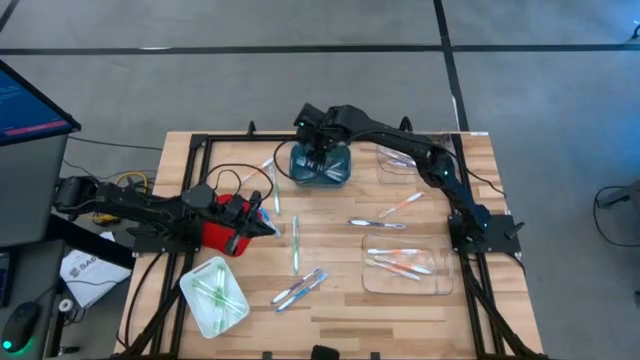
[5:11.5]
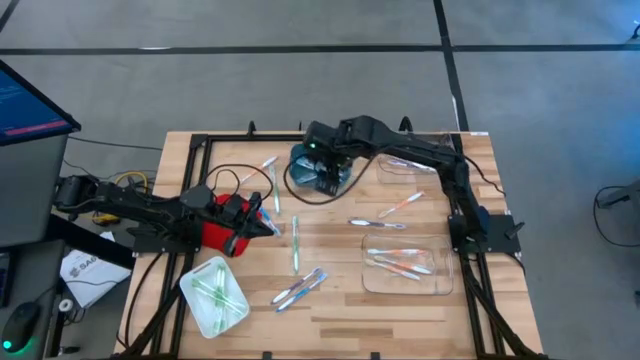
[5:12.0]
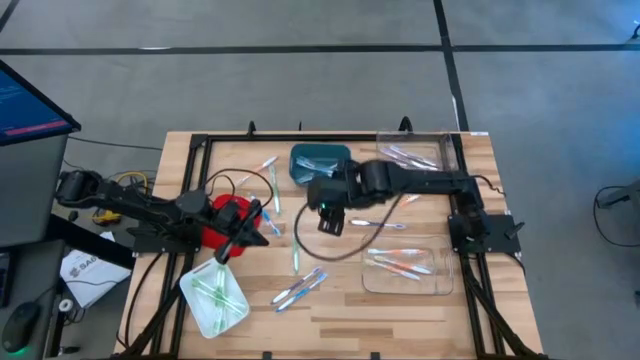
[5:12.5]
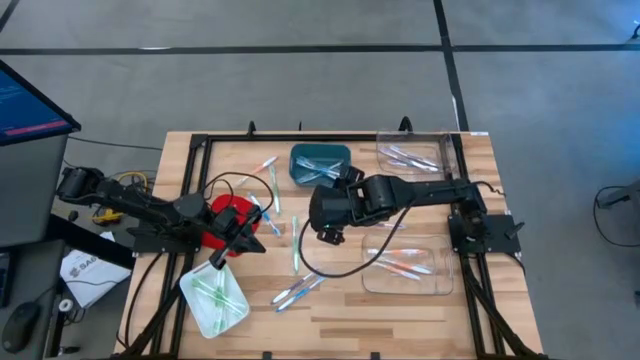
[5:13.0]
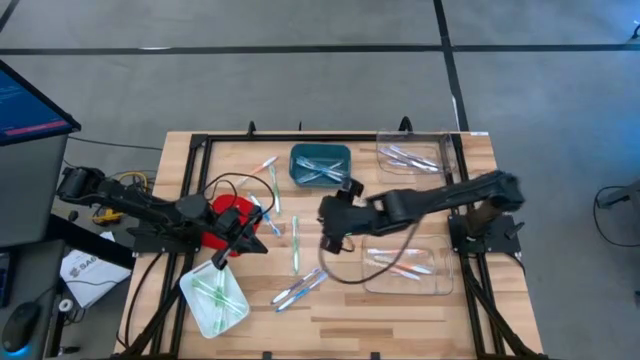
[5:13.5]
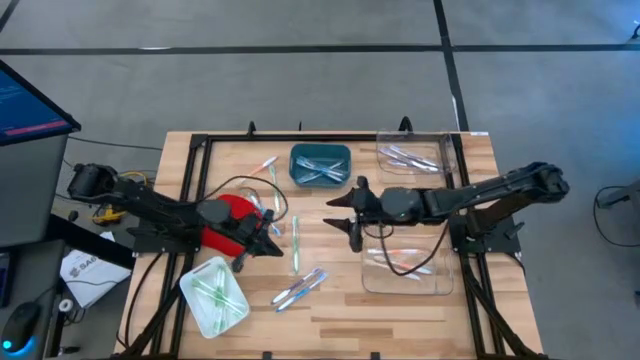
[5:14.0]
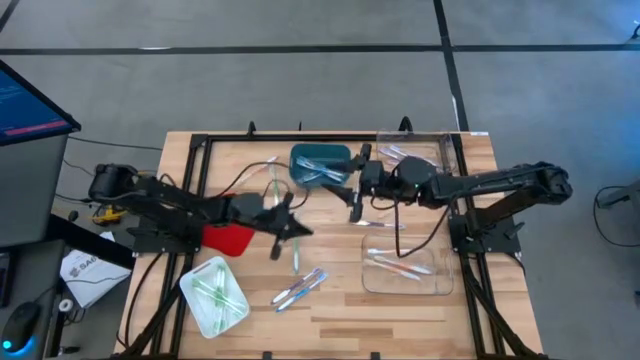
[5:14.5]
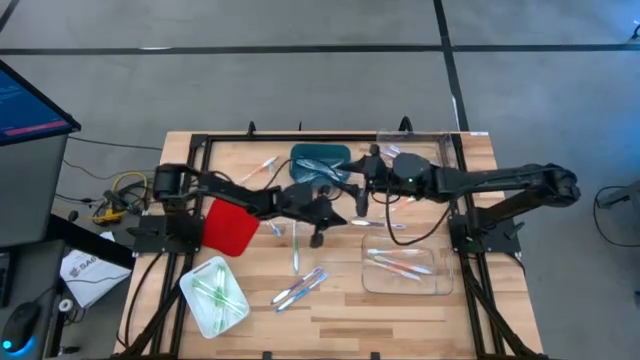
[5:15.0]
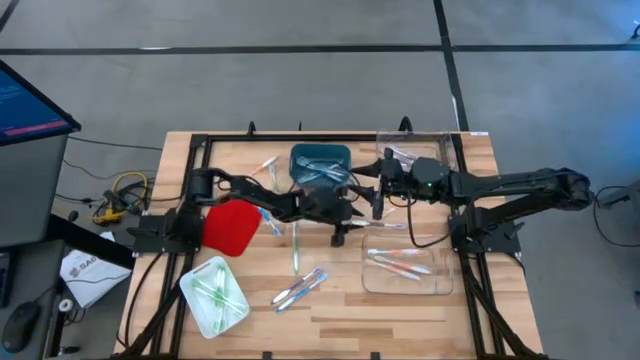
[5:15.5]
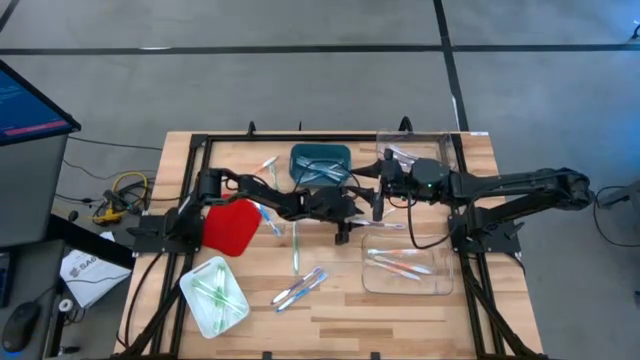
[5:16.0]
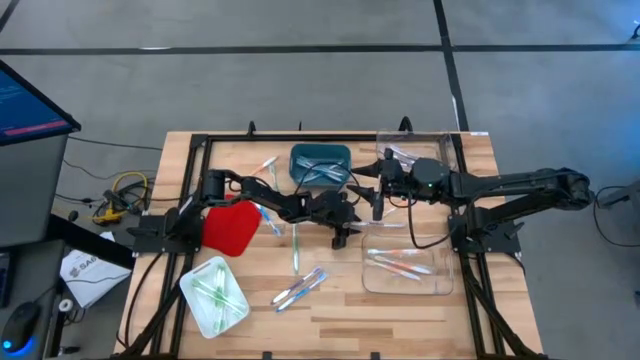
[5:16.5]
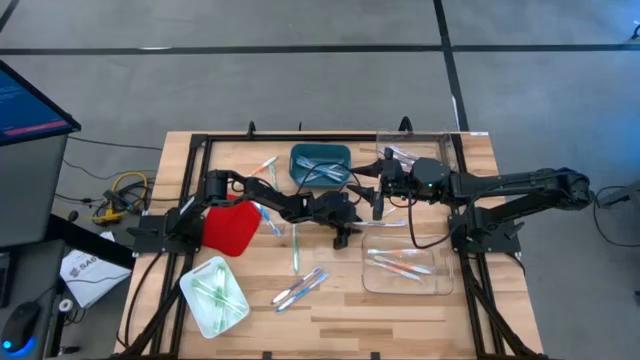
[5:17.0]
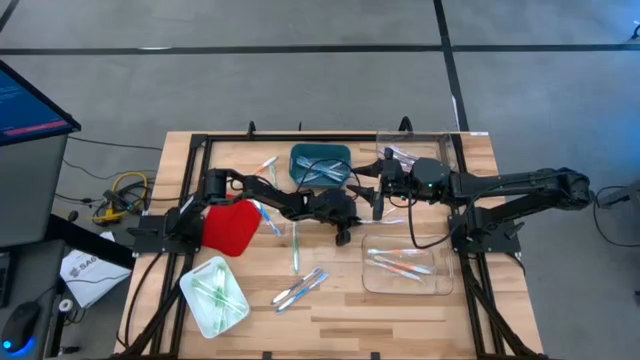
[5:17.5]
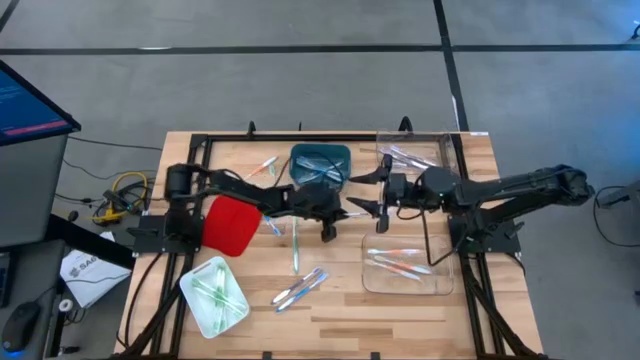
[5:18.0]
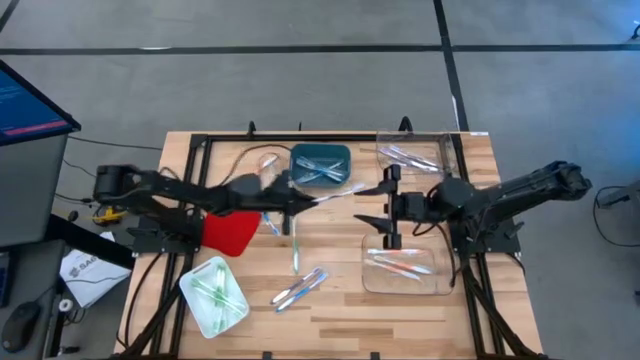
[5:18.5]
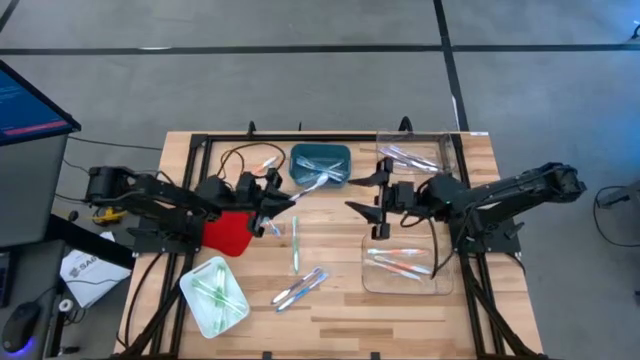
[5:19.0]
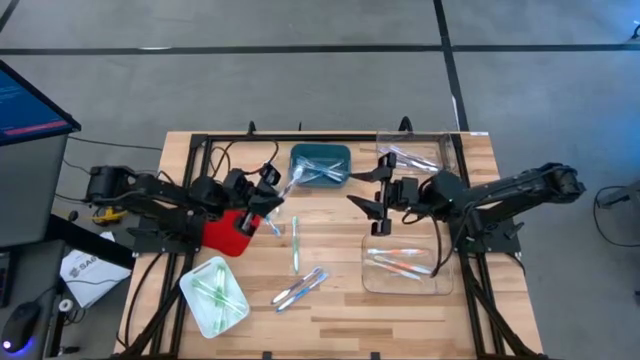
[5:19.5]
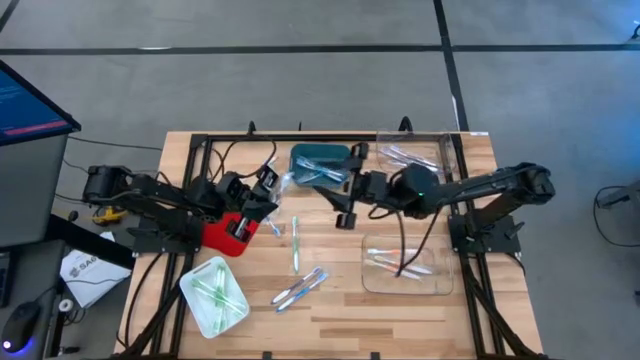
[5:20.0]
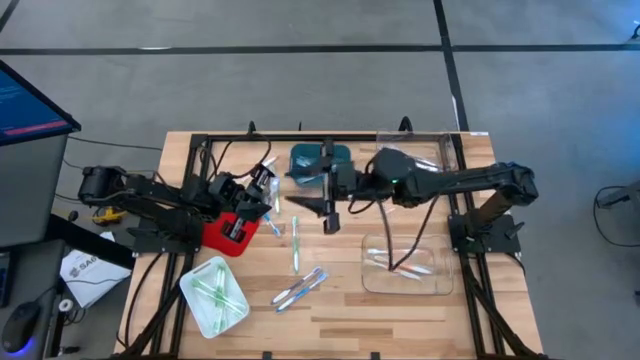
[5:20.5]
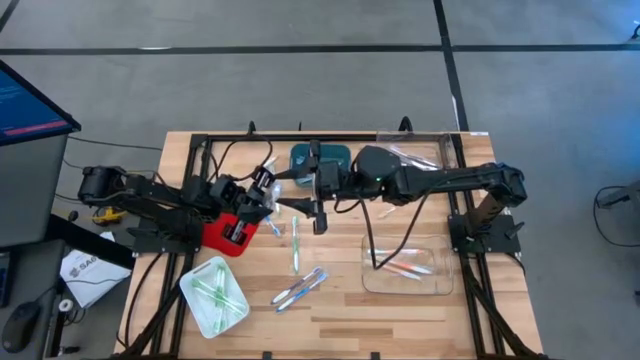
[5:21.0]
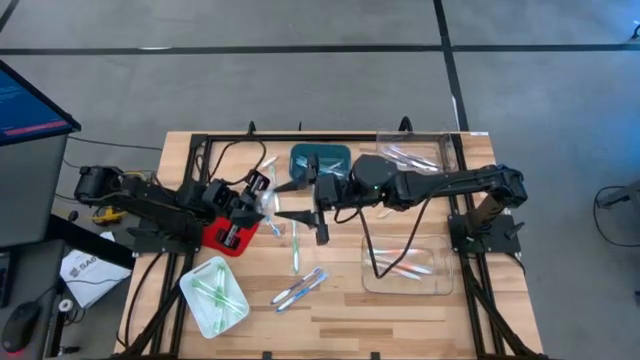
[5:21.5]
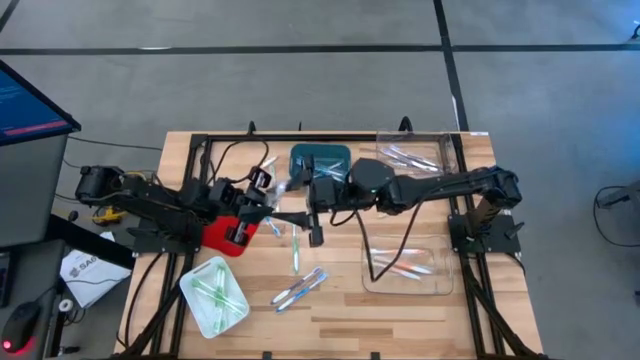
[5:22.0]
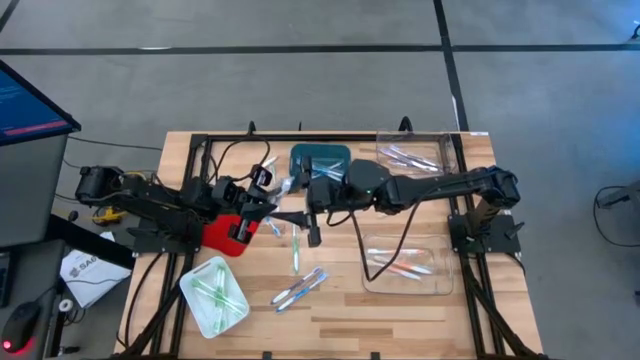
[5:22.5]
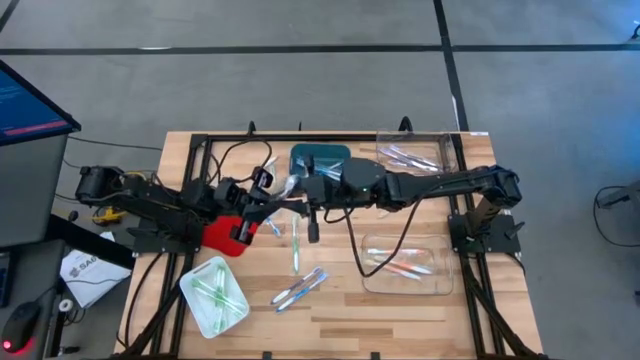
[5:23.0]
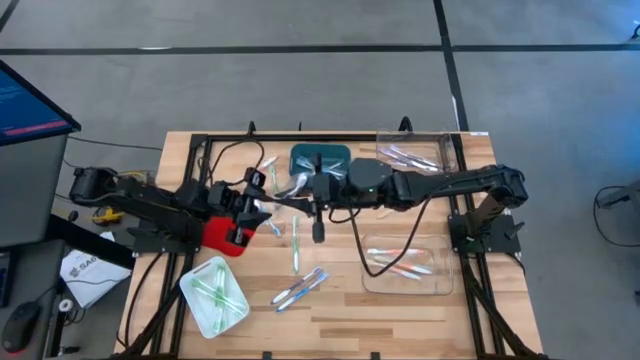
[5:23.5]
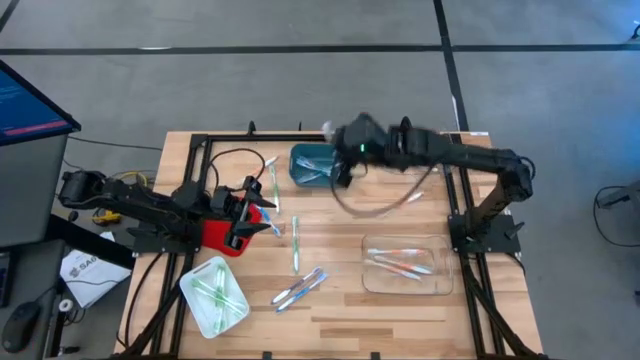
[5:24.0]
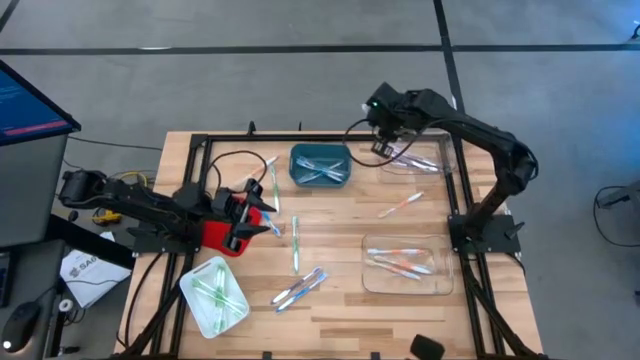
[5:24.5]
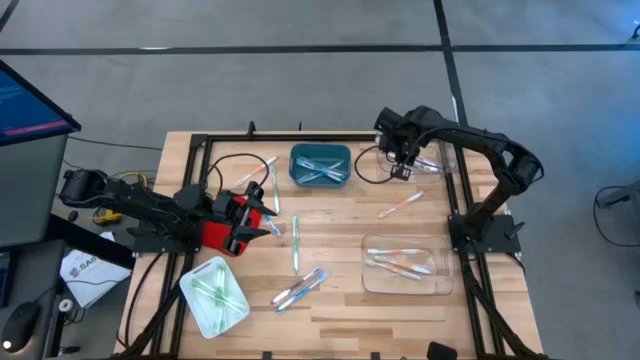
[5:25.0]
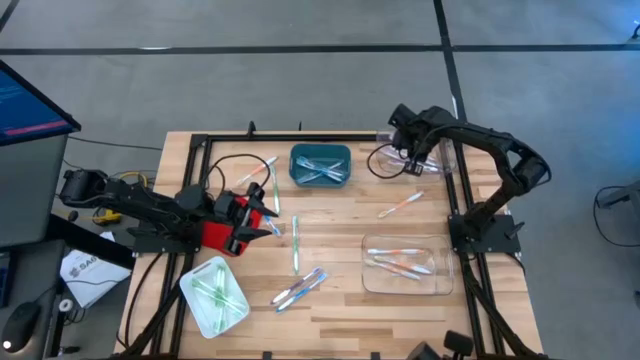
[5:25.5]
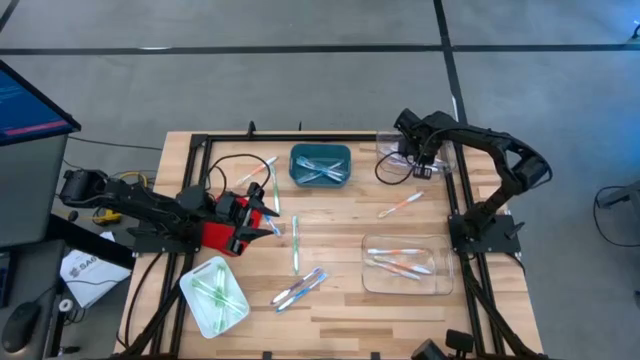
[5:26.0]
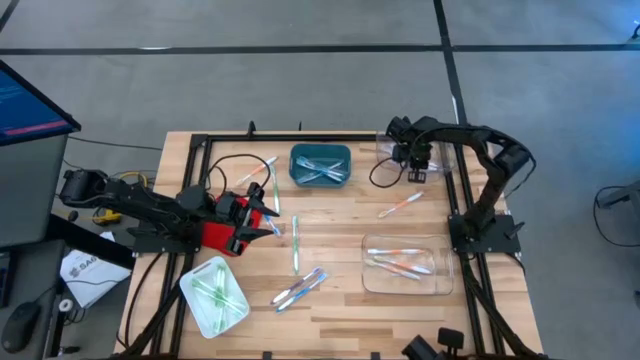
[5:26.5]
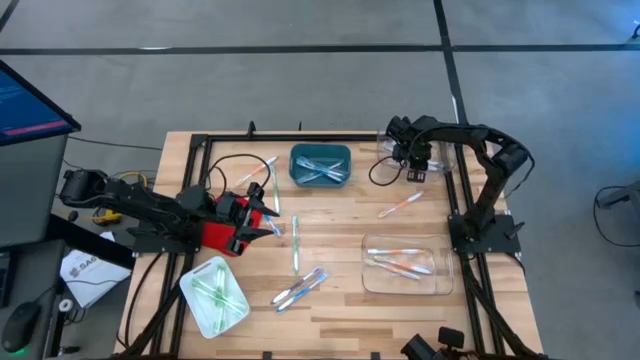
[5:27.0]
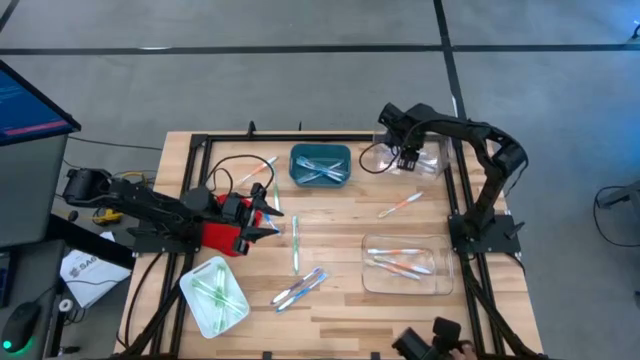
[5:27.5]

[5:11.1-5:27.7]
Task: Pick & Place Toothbrushes
Put the purple toothbrush into the top transparent bin

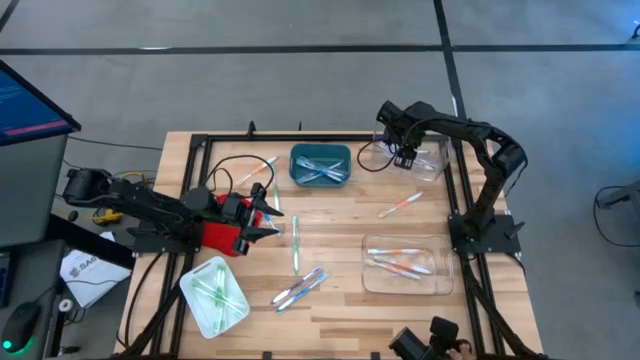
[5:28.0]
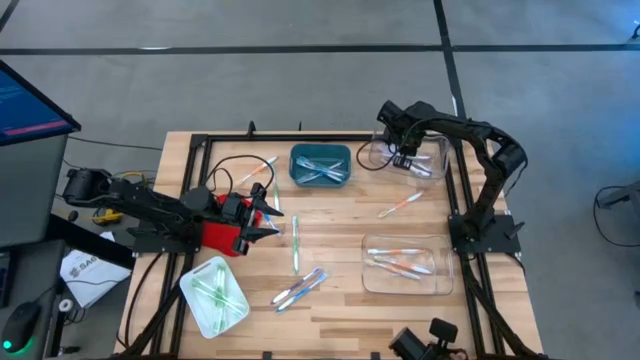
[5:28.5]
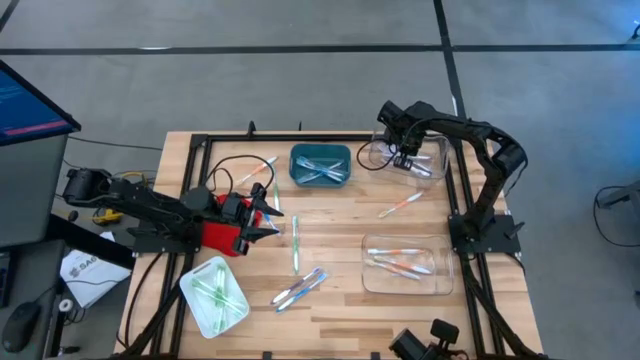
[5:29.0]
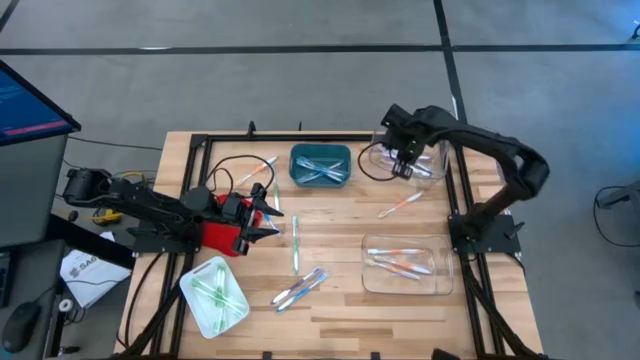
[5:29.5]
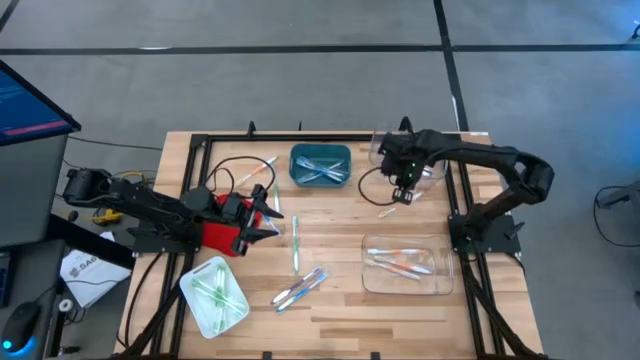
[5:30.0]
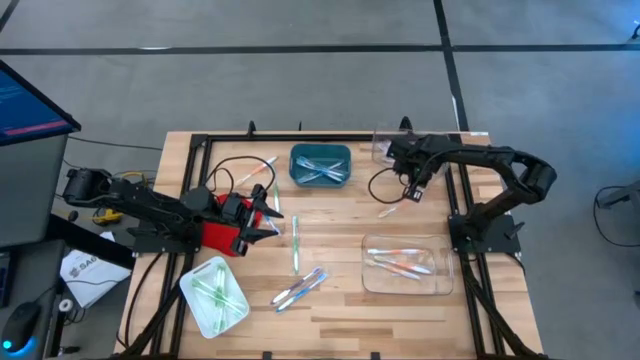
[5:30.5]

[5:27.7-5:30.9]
Adjust the top transparent bin on the table

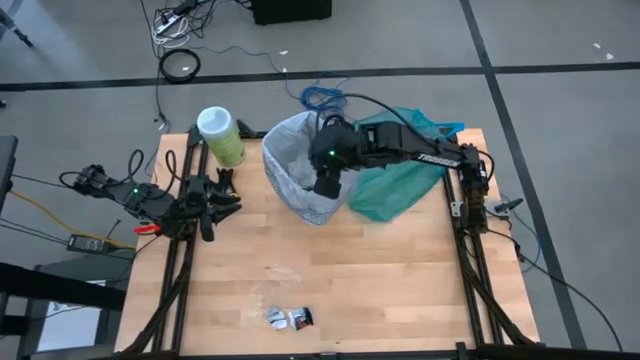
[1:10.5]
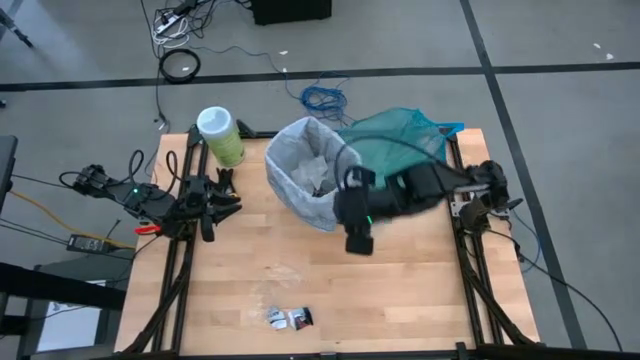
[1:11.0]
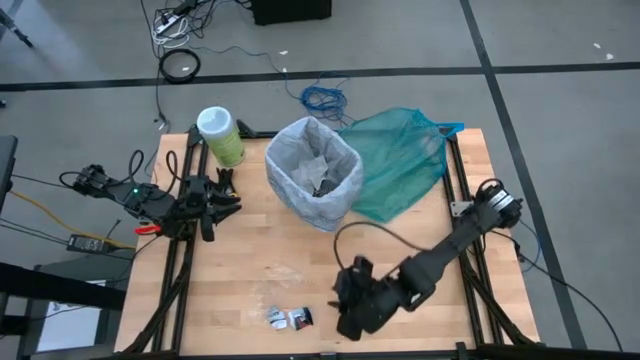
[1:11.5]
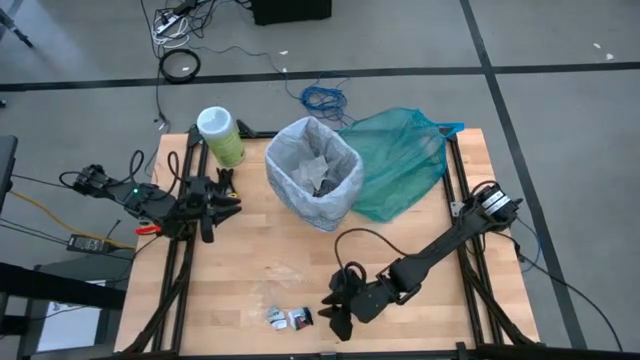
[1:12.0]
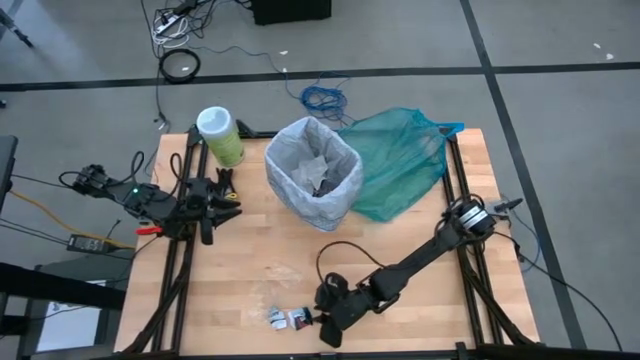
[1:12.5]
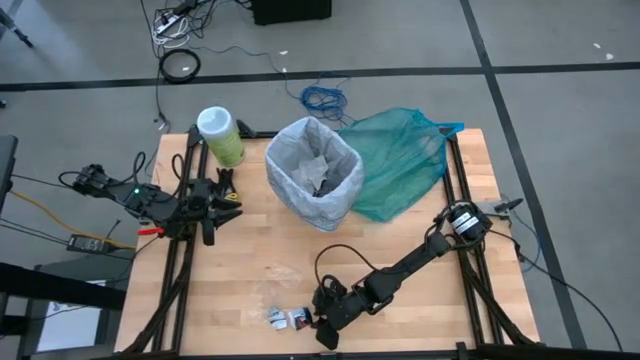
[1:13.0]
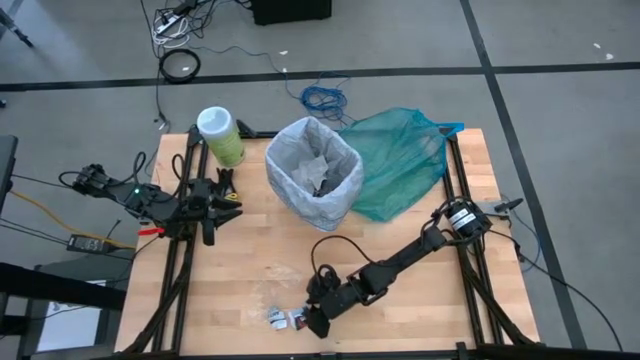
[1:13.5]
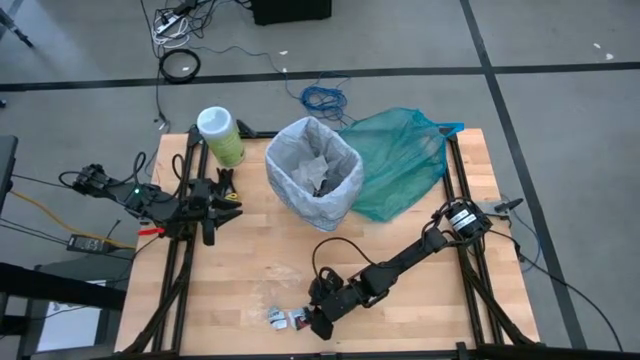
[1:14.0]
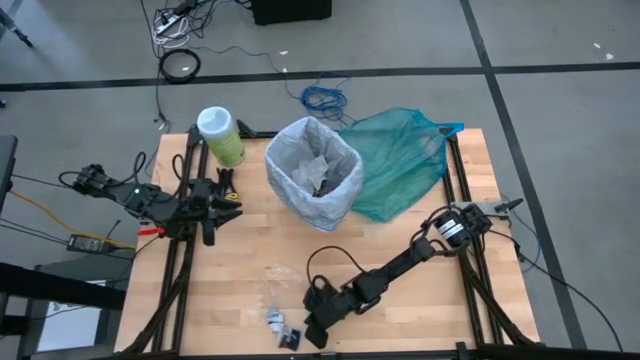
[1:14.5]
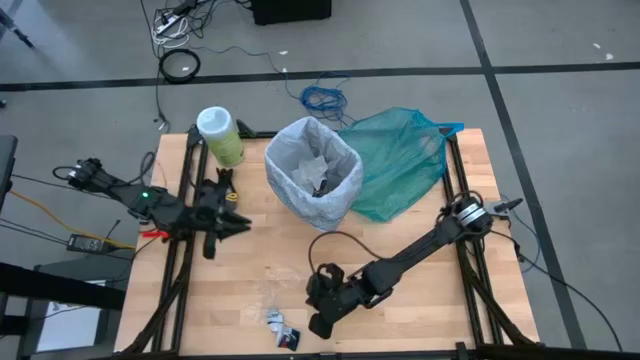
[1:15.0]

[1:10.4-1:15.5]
Task: place trash/remove bag and relplace
Put the dark blue paper into the trash bin
